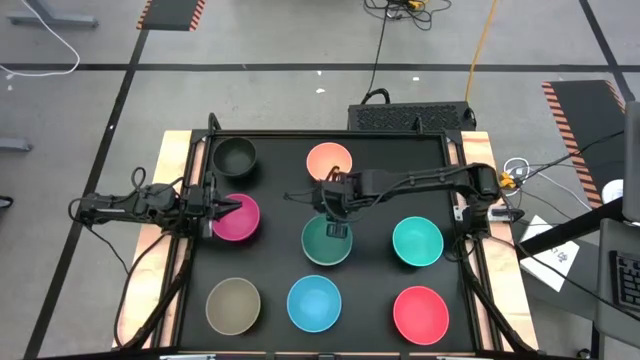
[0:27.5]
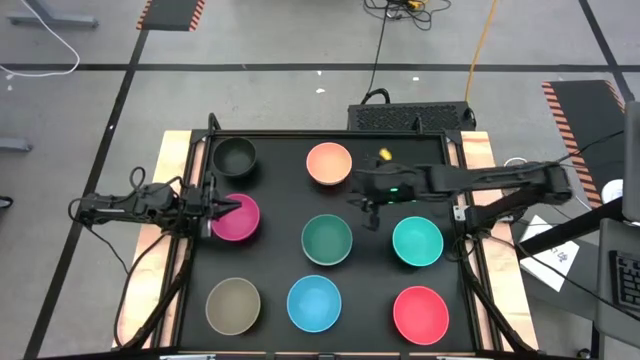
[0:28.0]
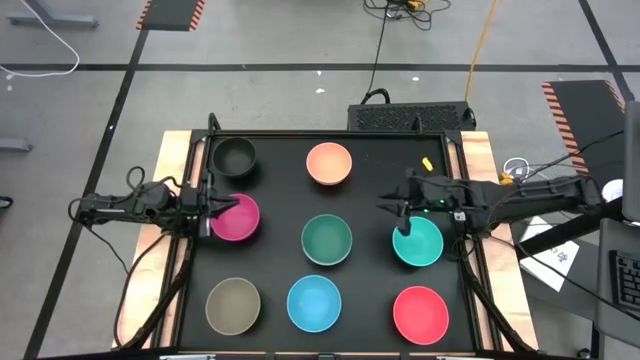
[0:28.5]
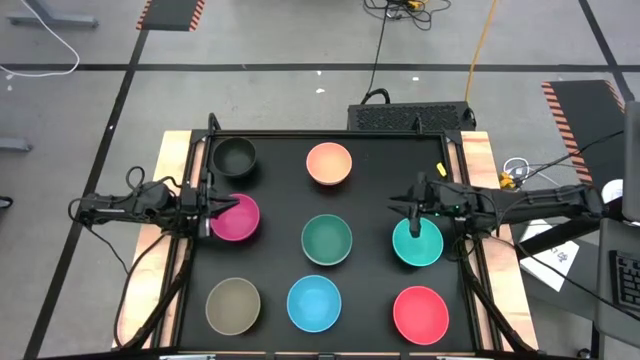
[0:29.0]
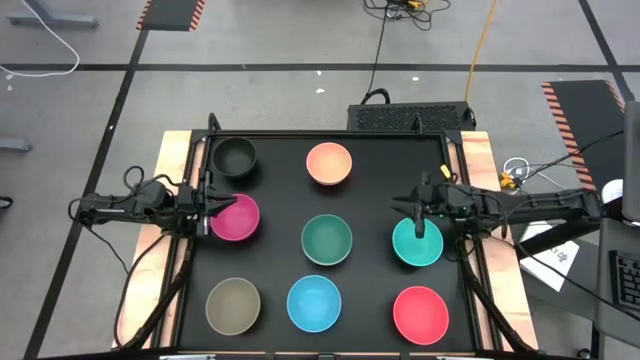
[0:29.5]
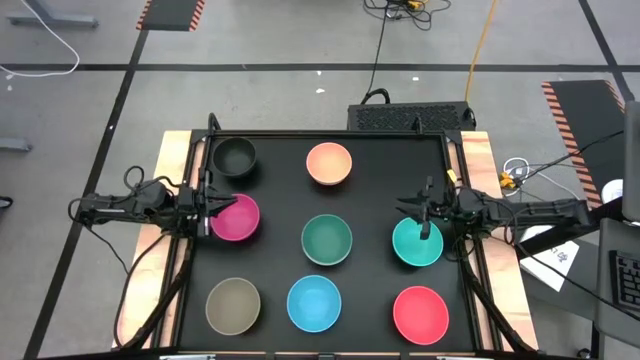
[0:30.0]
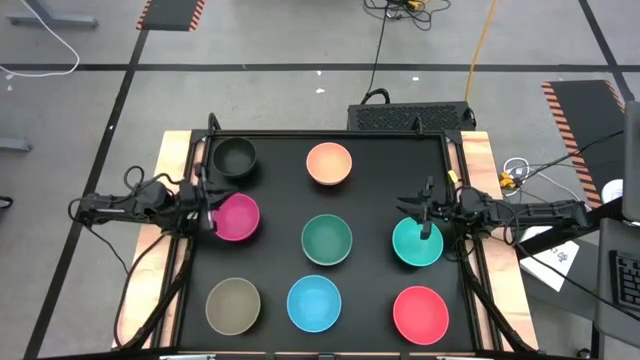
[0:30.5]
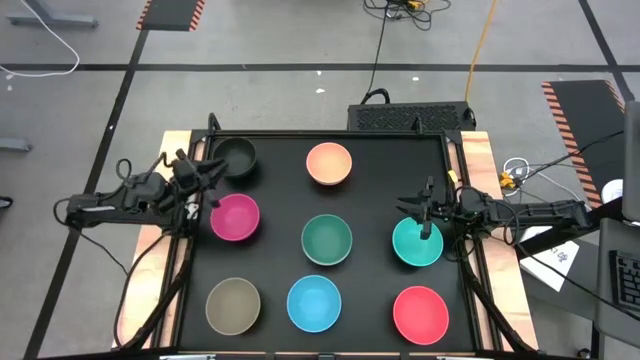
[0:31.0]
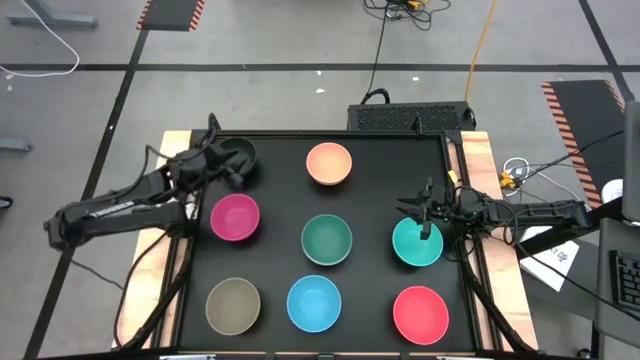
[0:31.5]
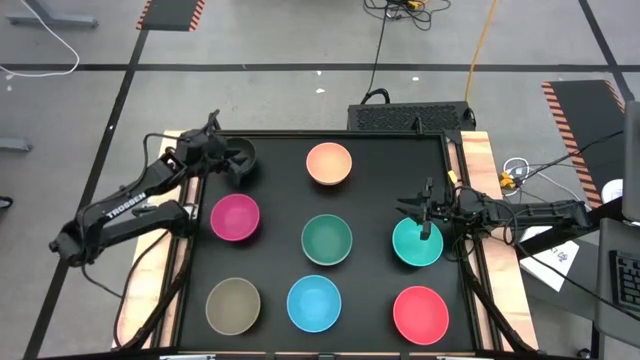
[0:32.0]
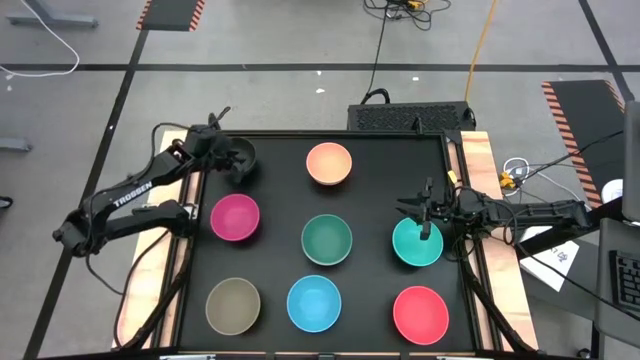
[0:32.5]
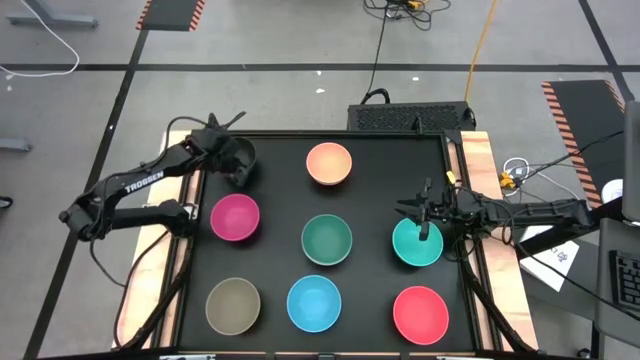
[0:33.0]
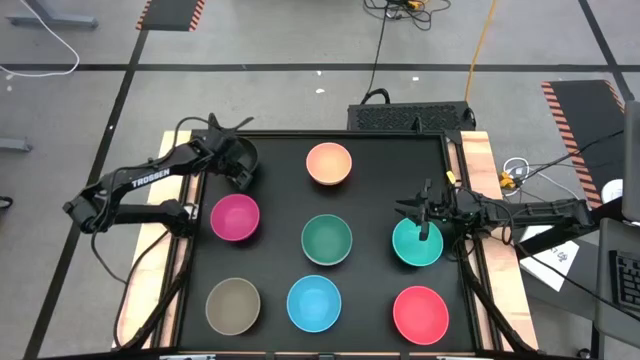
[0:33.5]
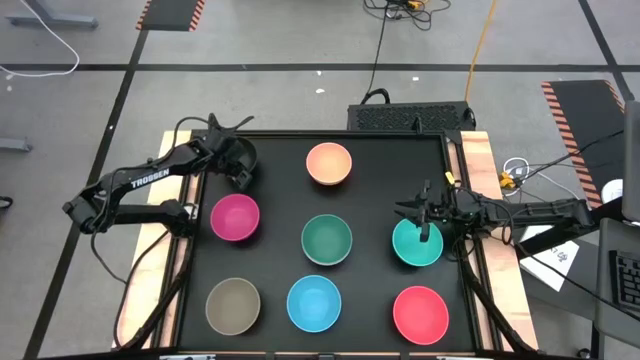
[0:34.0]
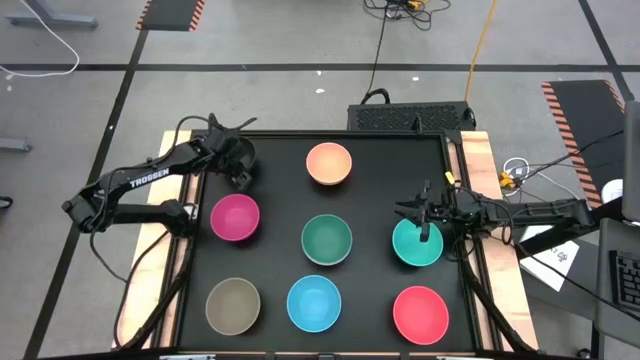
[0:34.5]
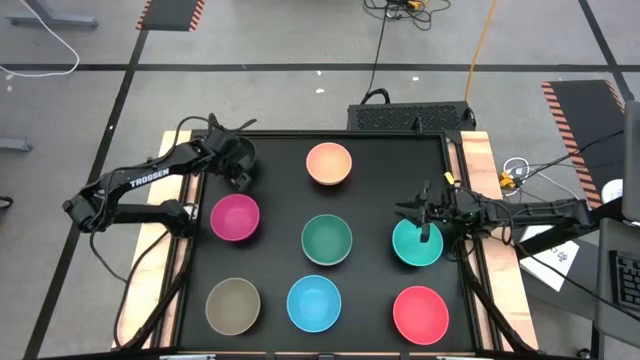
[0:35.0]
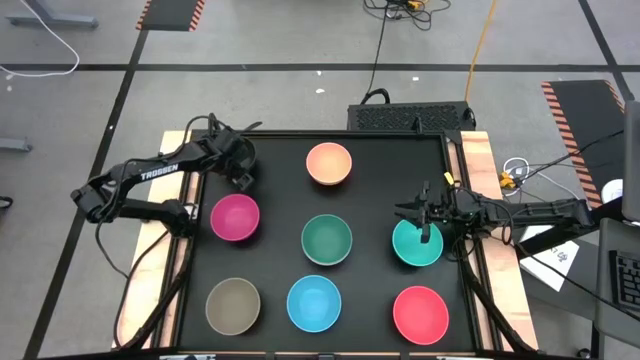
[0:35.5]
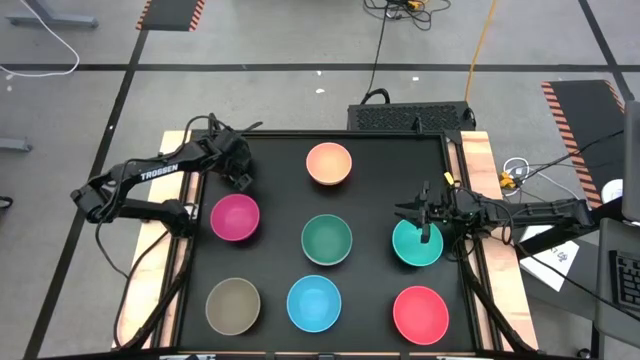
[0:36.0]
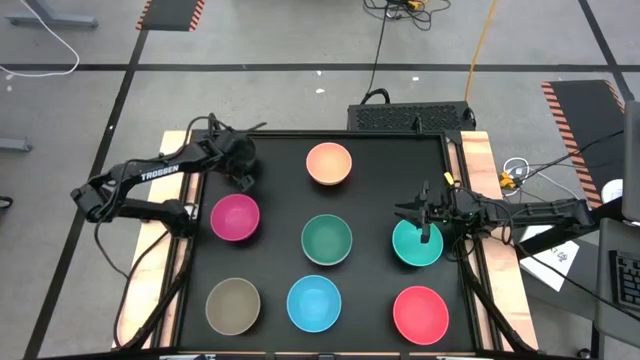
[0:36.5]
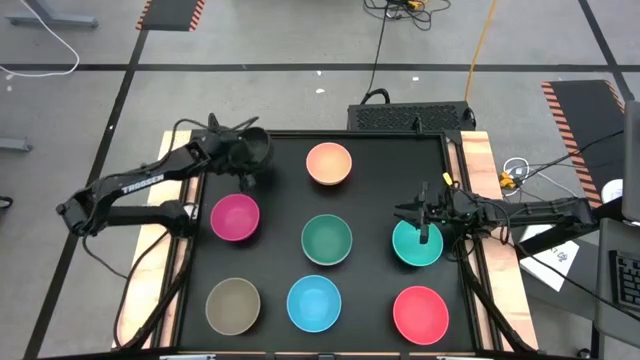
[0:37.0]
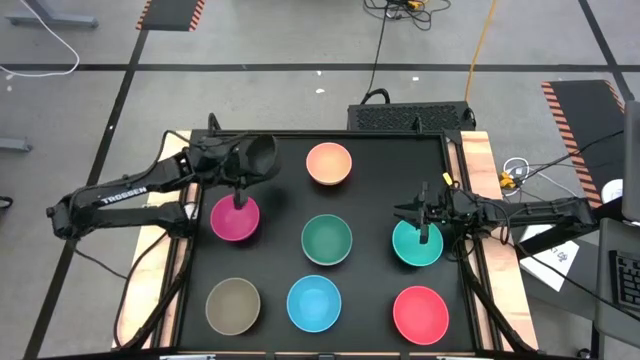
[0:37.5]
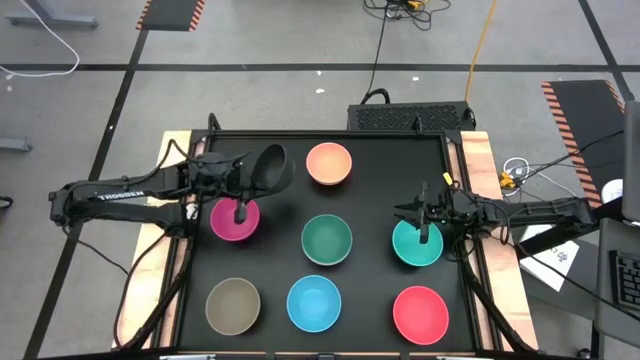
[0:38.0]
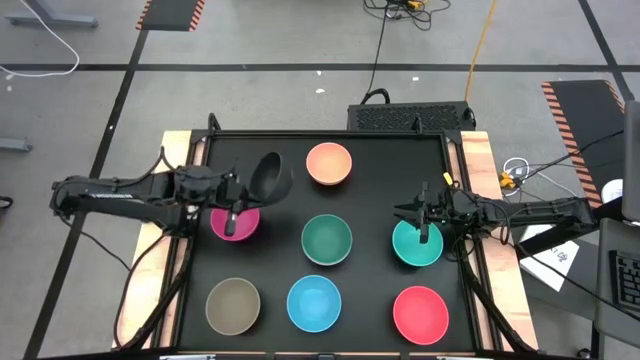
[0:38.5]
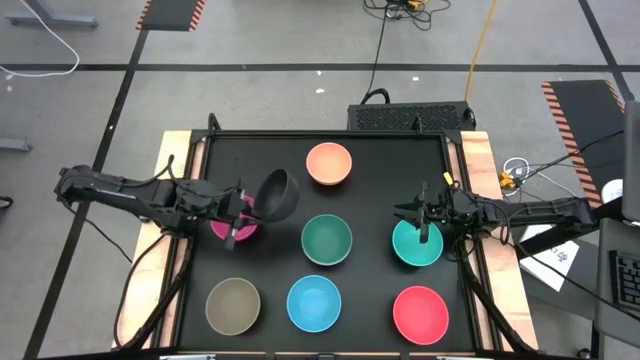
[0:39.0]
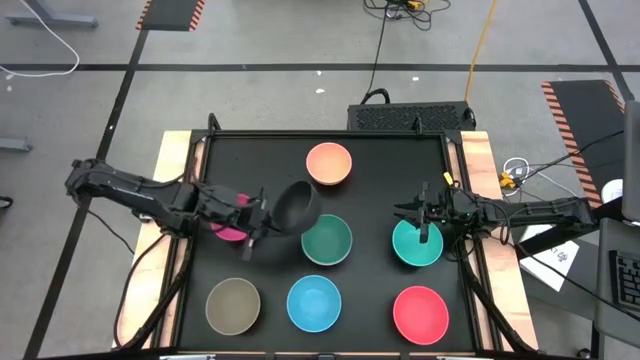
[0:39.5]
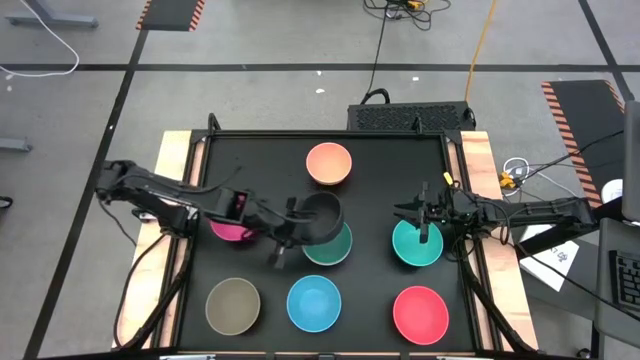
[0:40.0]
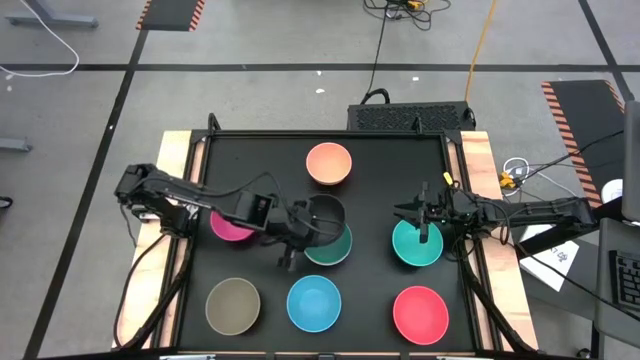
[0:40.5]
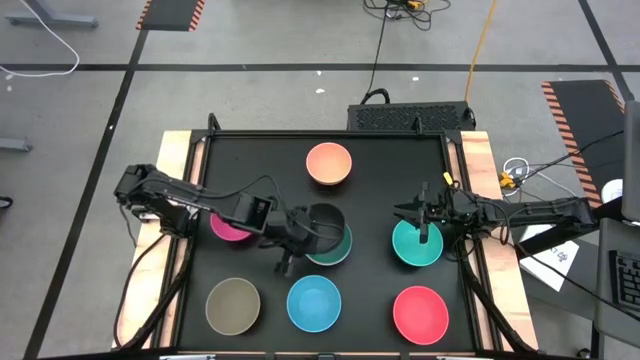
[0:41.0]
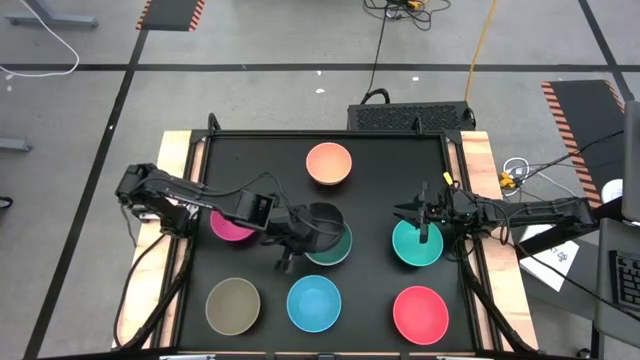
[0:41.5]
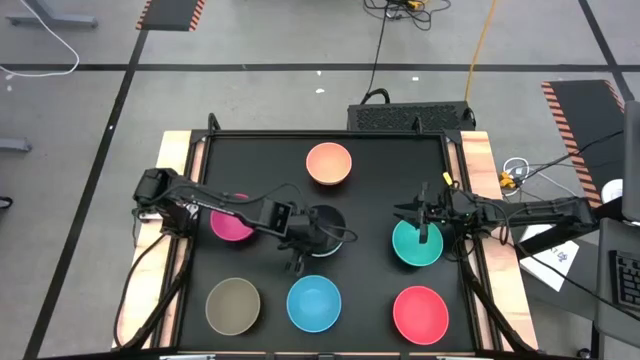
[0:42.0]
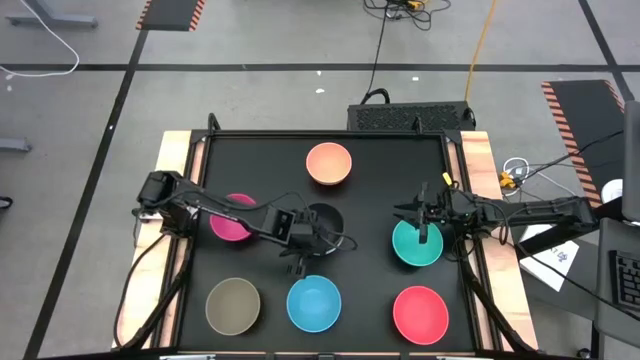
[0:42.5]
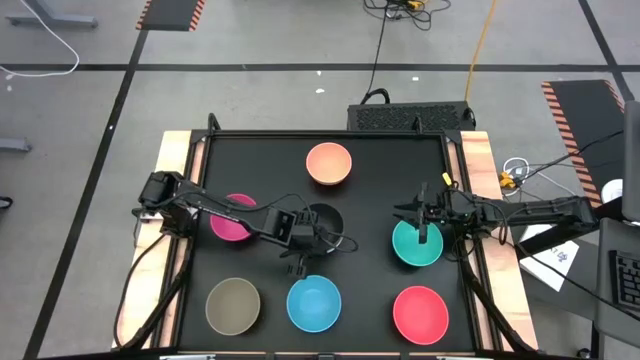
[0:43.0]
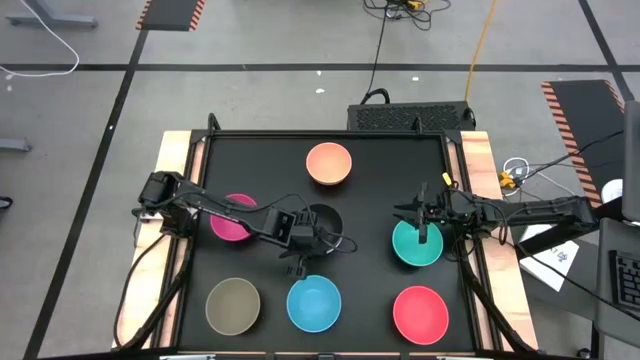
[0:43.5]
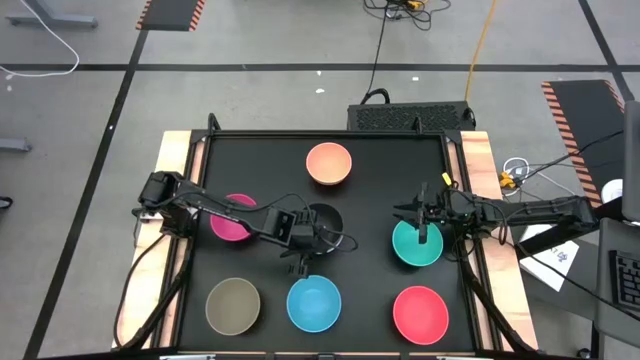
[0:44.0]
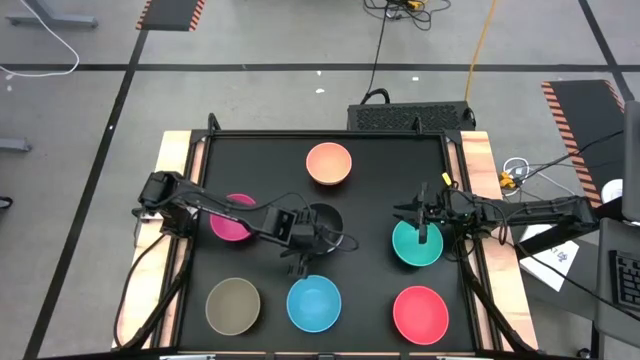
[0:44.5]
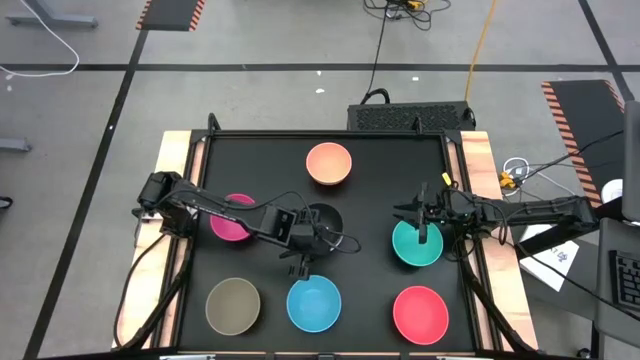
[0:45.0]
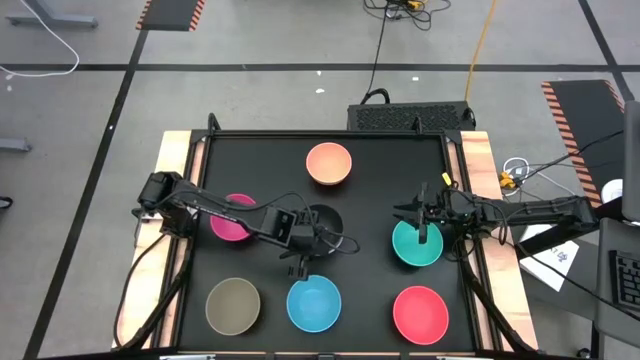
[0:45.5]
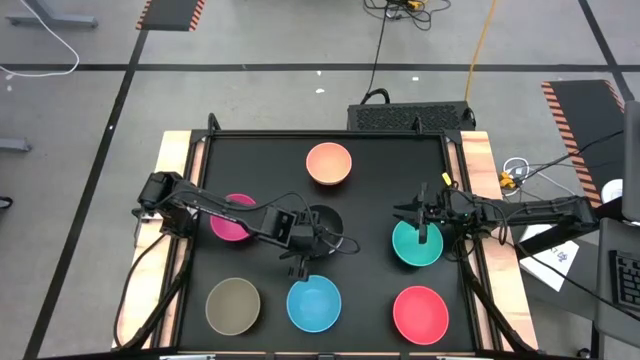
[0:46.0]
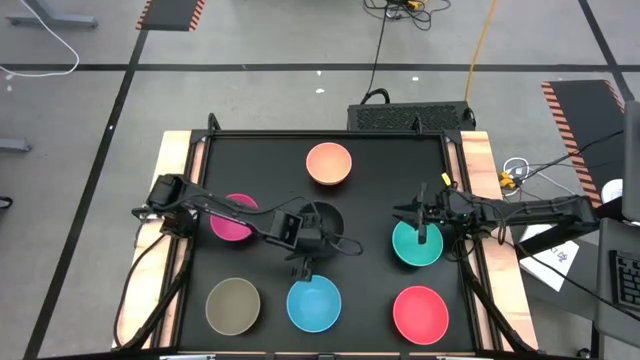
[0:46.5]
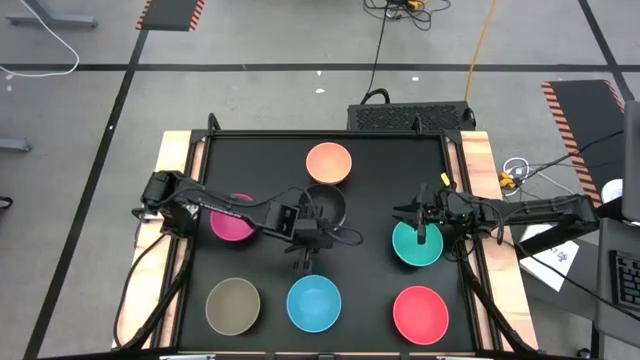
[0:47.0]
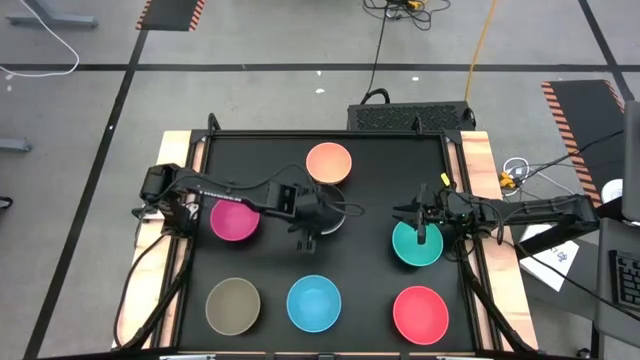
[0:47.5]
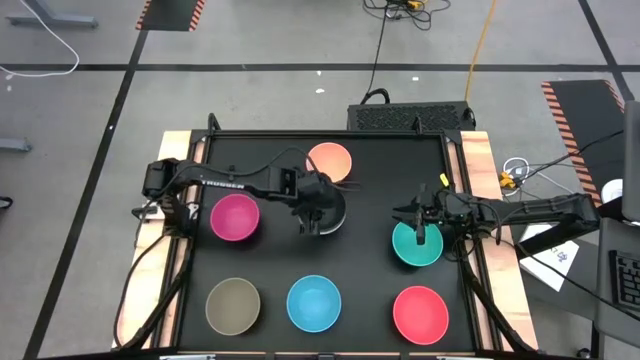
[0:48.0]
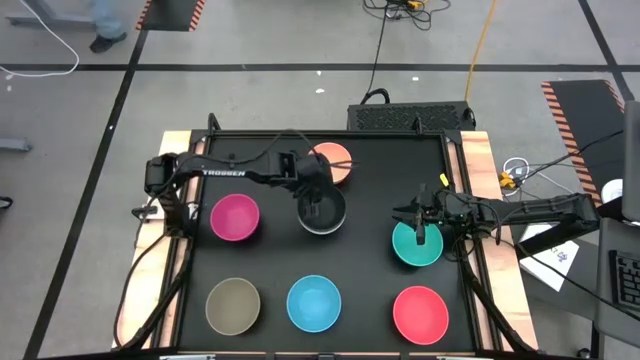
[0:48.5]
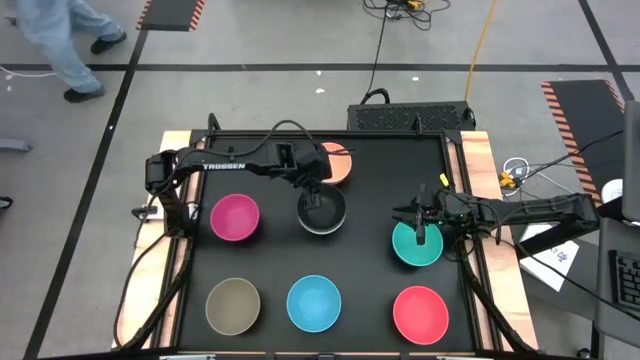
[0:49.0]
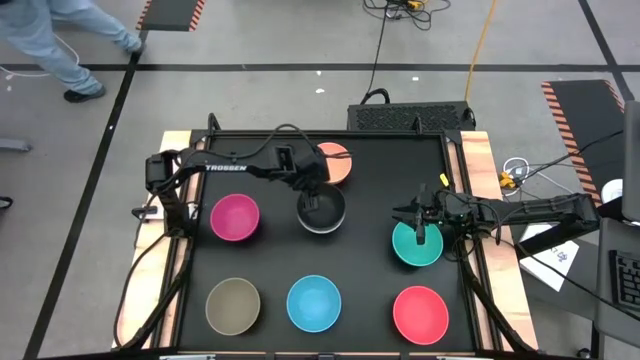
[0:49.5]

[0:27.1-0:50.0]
Task: Nest bowls inside each other
Stack the black bowl on the green bowl
